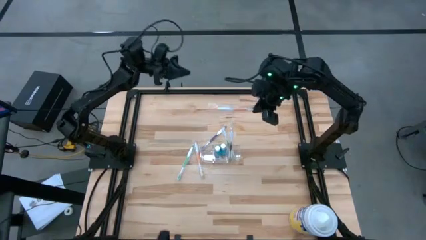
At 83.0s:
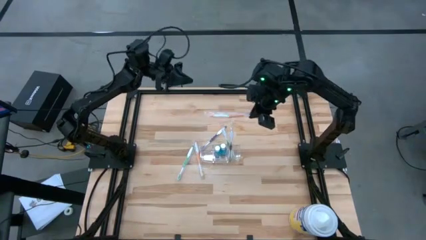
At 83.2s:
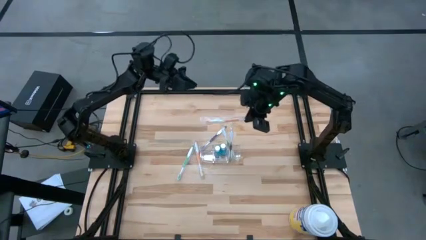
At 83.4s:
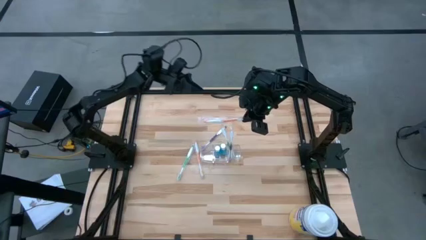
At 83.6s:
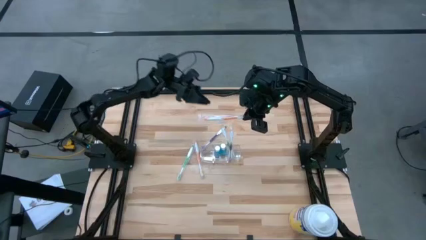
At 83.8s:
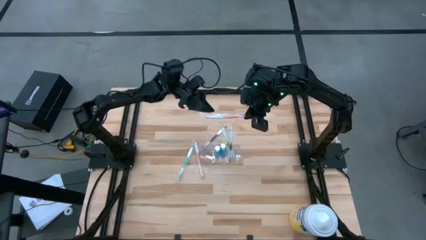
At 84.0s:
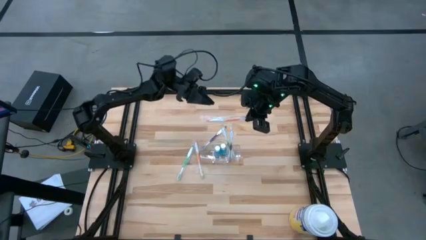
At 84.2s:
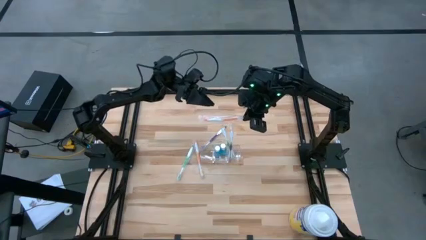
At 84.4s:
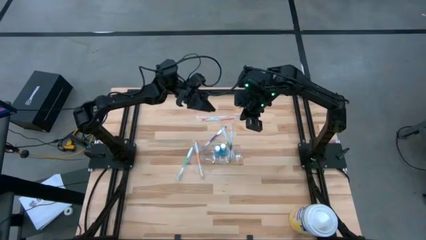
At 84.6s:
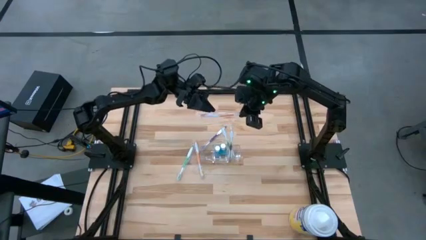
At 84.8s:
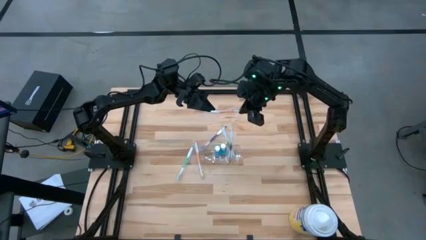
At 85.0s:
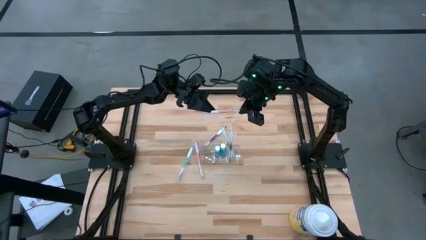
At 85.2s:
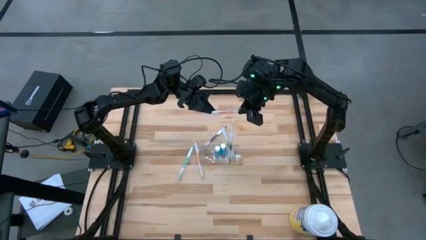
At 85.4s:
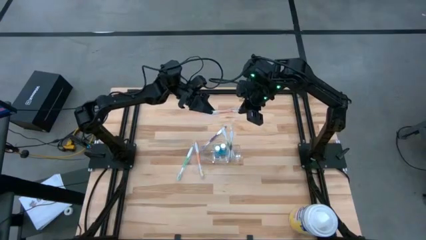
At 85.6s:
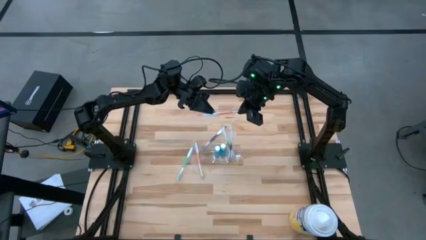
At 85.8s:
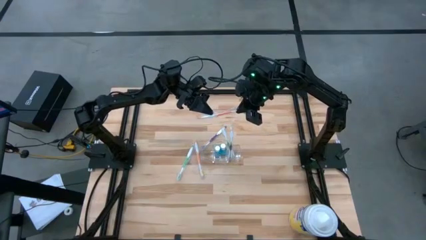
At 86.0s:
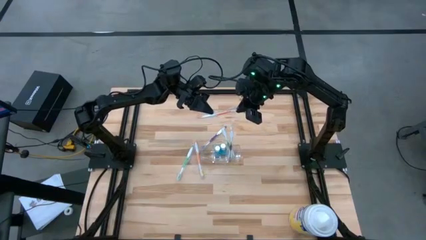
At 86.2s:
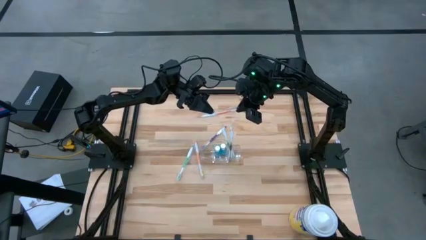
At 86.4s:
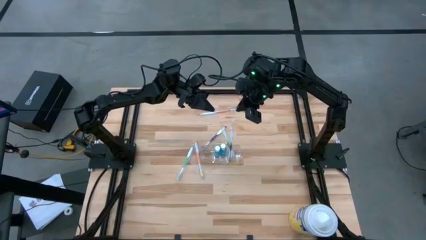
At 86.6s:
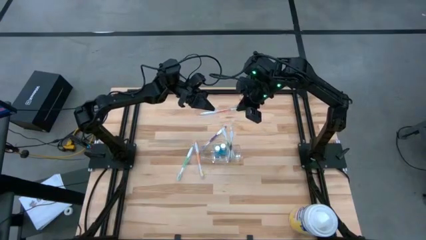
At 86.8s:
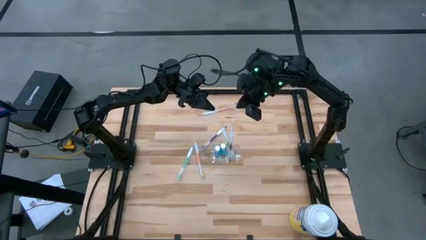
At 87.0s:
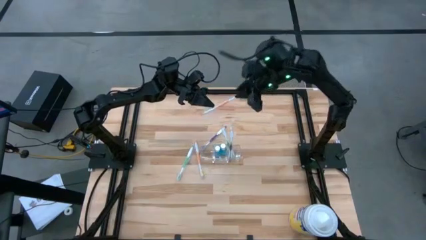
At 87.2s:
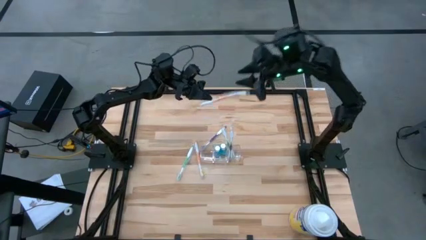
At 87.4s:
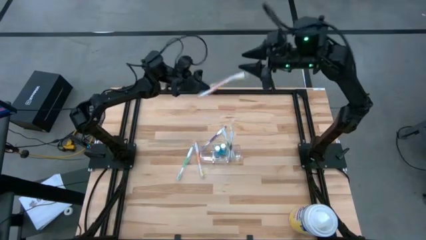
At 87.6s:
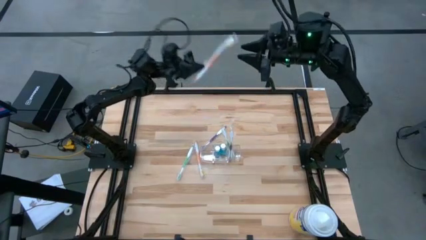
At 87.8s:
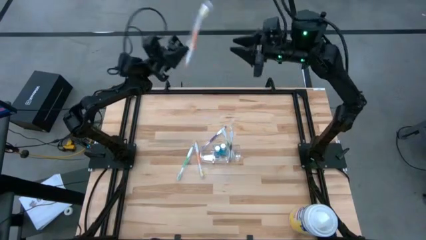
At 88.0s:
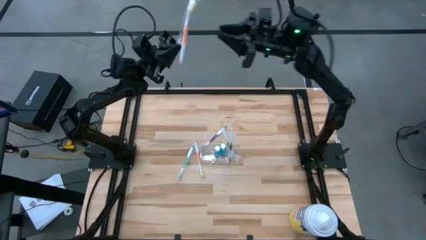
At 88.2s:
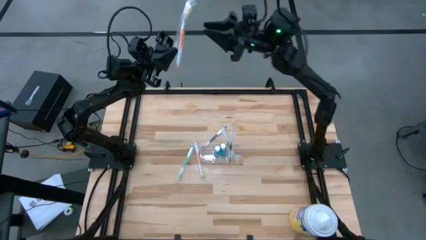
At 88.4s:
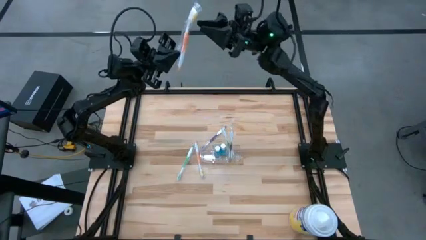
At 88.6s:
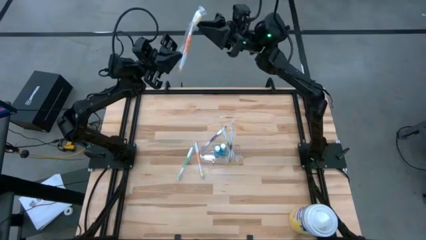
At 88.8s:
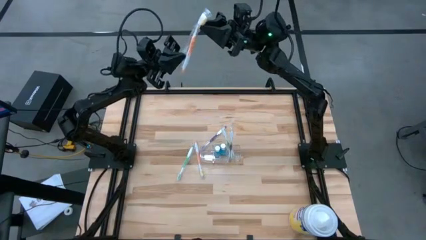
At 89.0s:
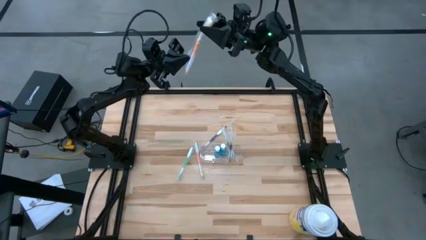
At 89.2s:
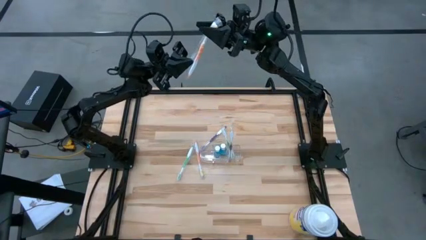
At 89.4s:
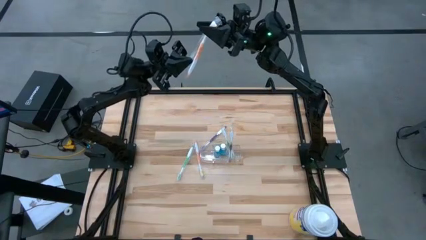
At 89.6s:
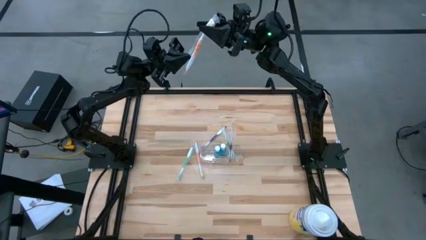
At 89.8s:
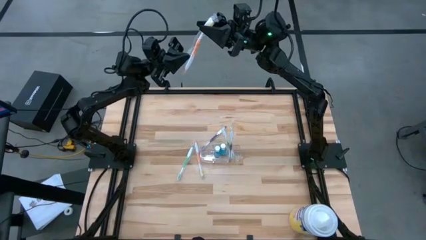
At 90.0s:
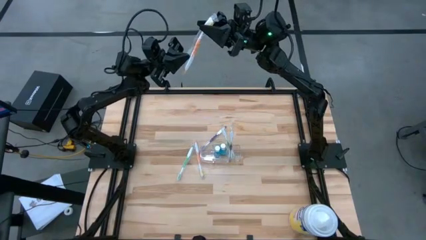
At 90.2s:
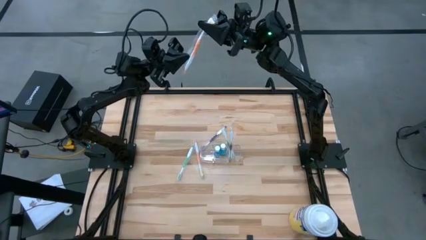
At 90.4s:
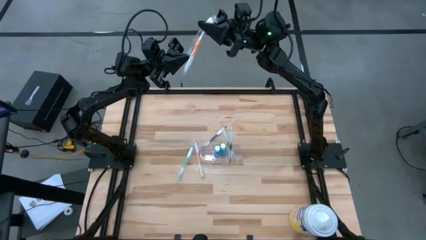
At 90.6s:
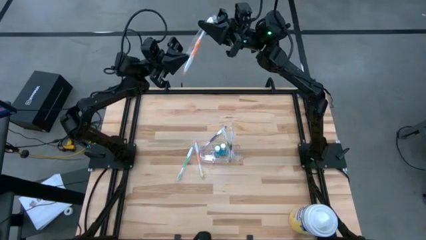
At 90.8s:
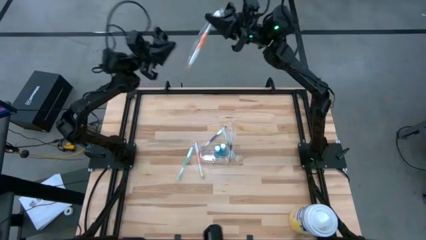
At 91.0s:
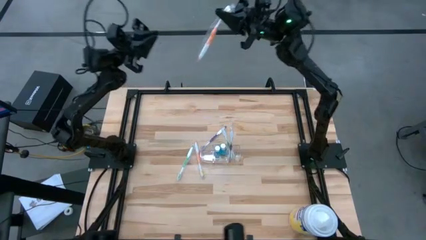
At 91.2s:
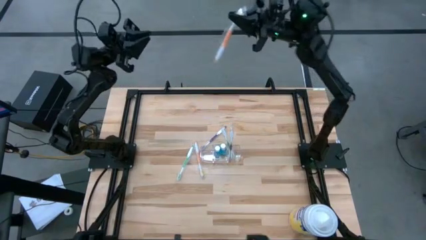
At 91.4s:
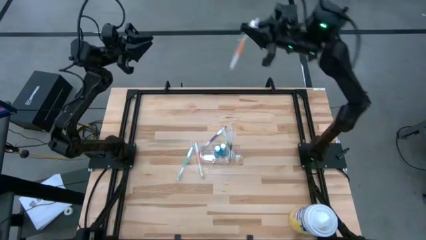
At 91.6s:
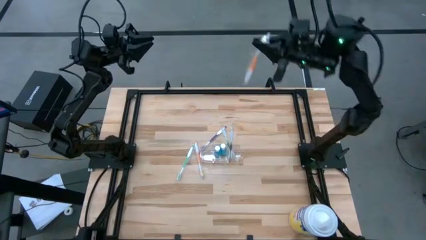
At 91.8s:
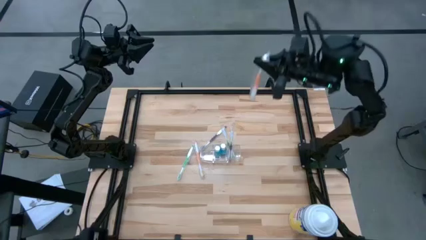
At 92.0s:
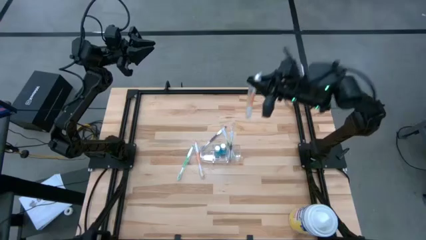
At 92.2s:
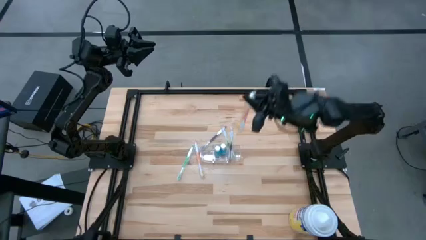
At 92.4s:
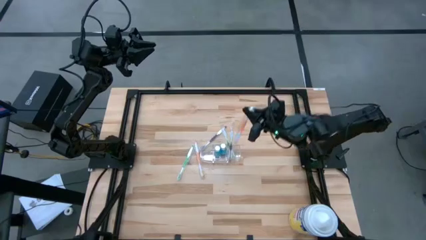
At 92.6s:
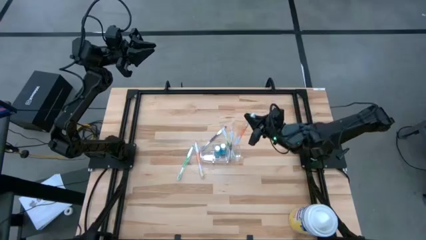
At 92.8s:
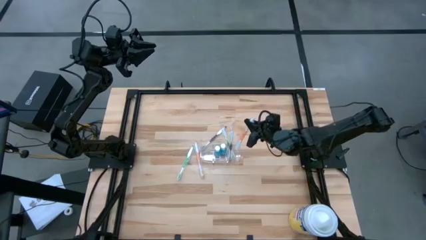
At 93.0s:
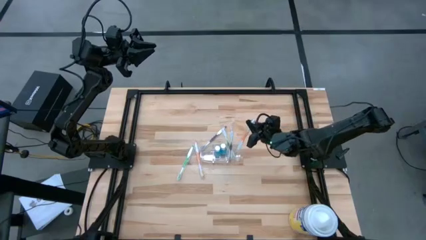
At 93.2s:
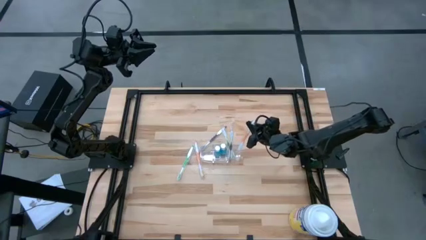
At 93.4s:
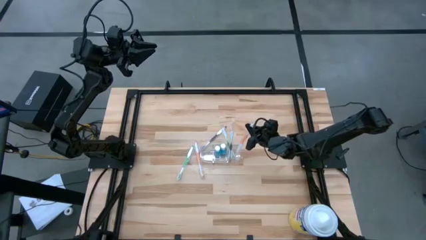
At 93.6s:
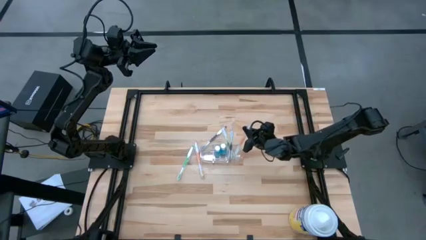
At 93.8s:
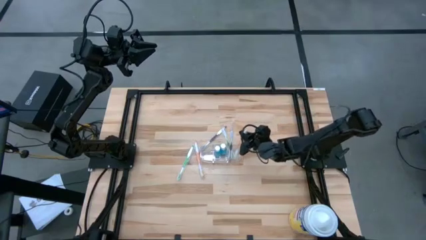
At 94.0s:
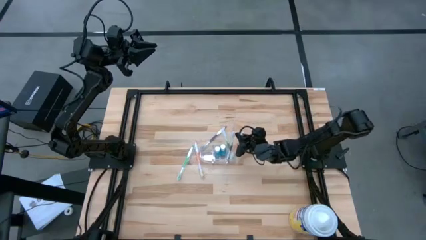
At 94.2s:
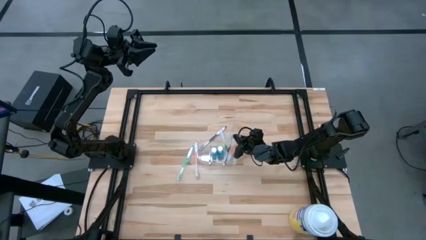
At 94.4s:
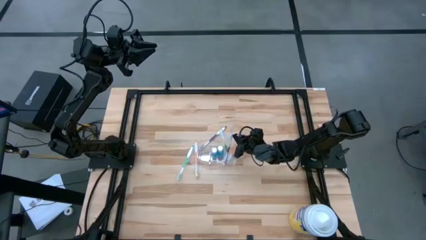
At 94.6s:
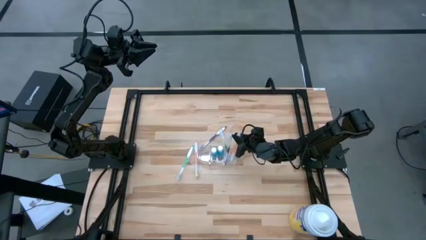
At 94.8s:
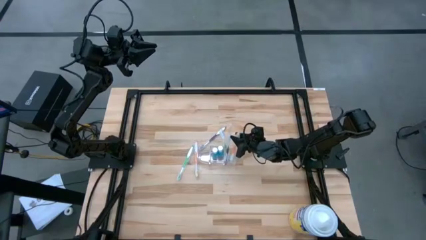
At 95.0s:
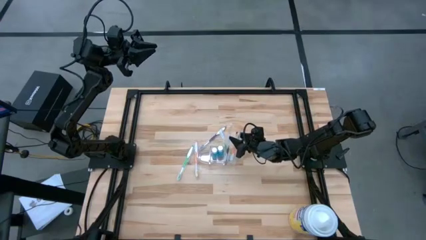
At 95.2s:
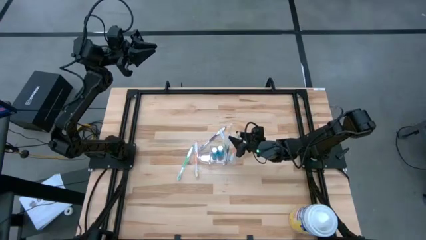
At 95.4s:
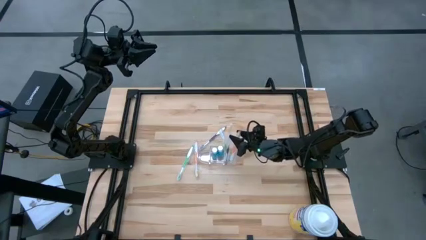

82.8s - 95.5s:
Task: Pick & Place toothbrushing station
Put the orange toothbrush into the transparent organizer
